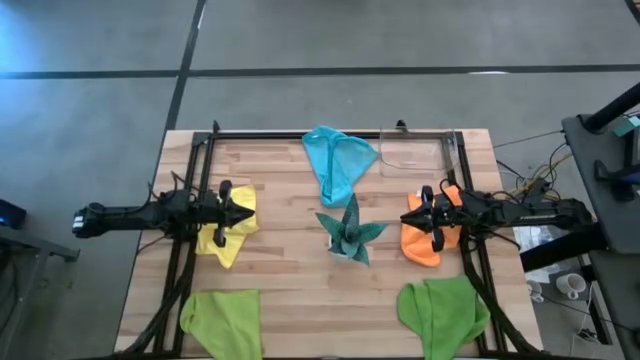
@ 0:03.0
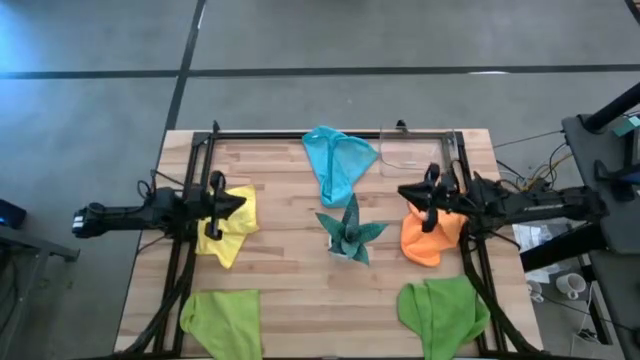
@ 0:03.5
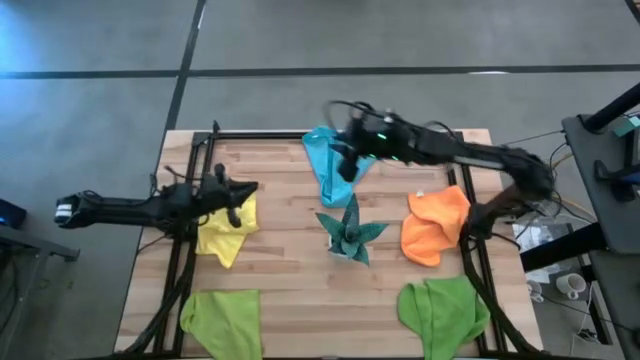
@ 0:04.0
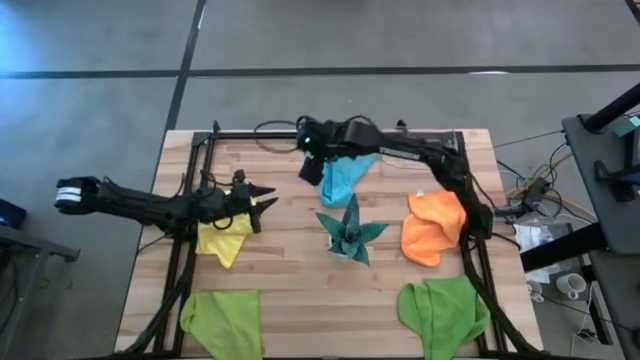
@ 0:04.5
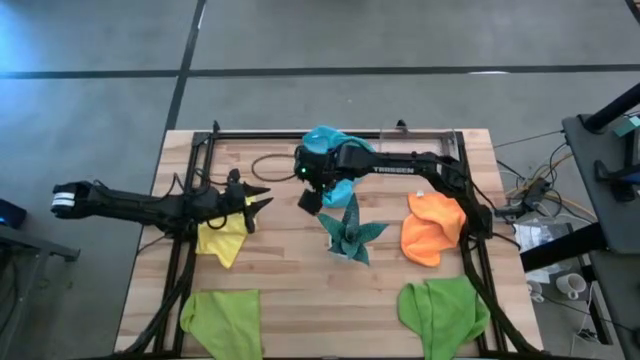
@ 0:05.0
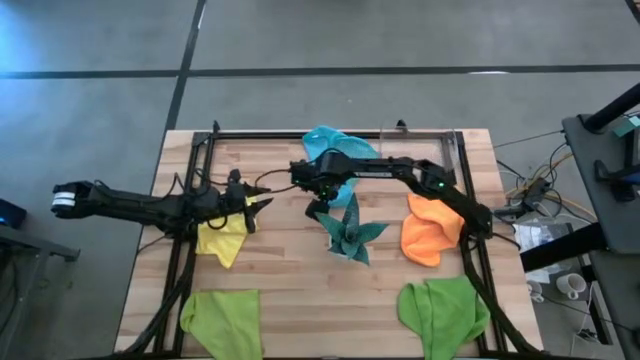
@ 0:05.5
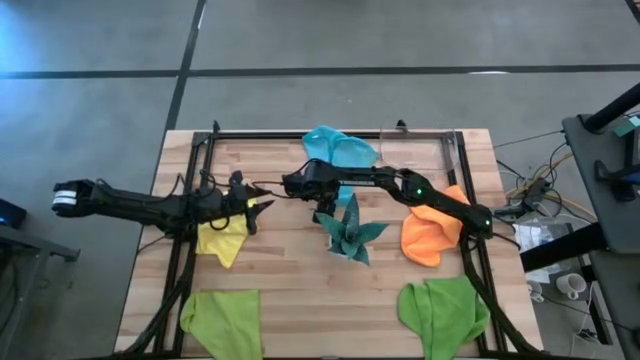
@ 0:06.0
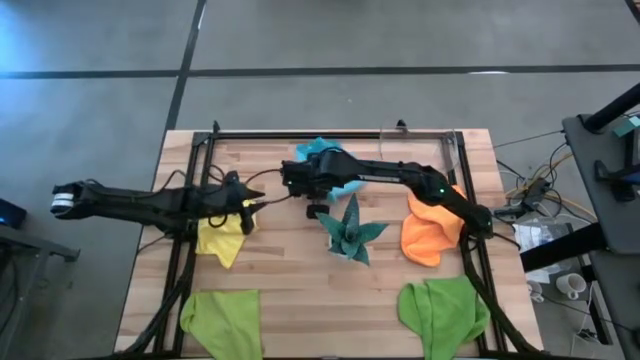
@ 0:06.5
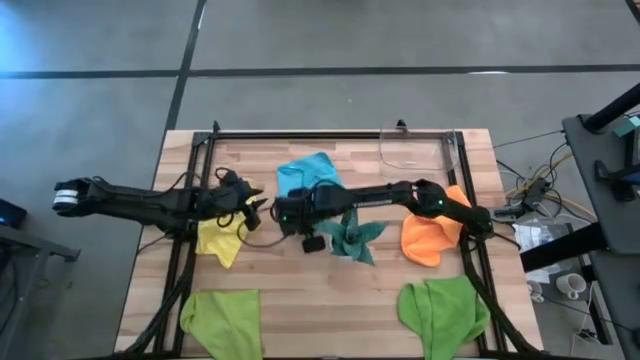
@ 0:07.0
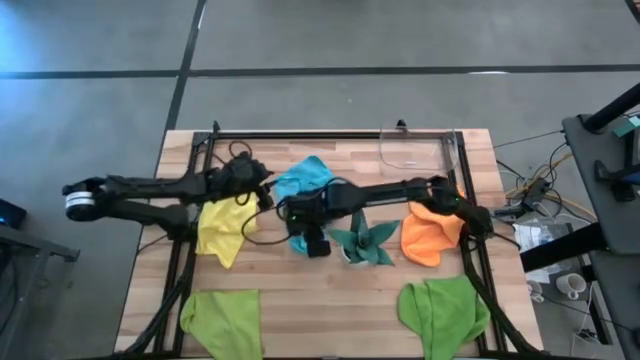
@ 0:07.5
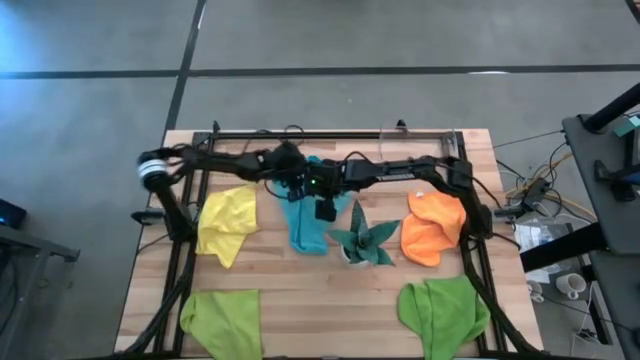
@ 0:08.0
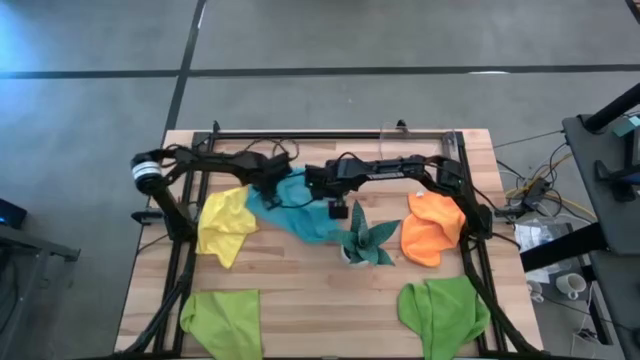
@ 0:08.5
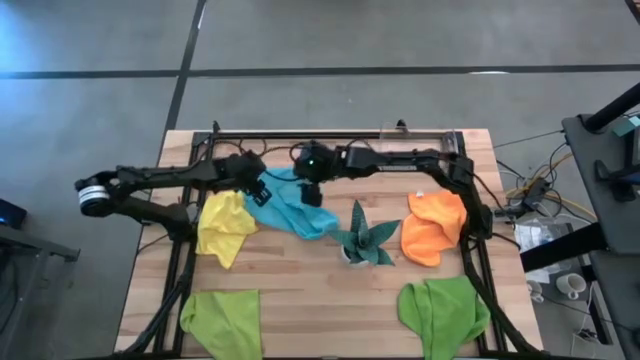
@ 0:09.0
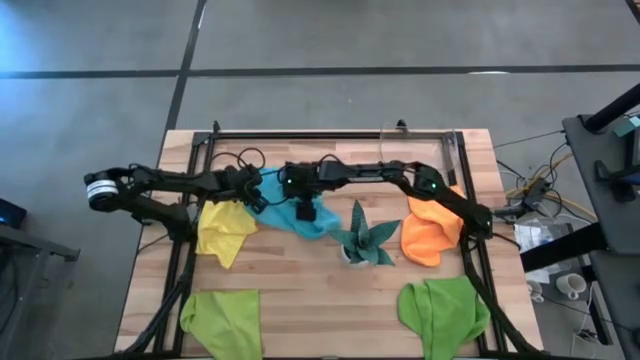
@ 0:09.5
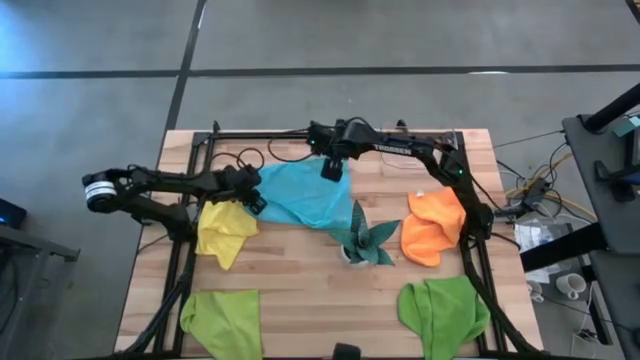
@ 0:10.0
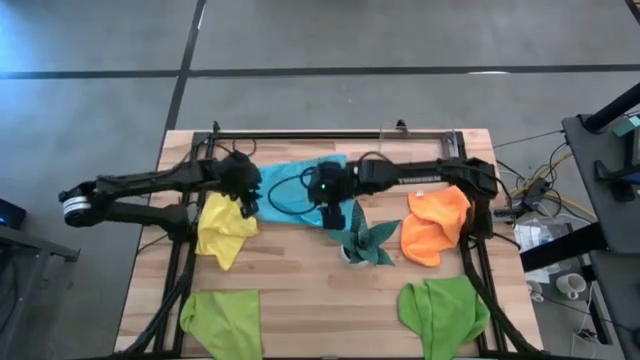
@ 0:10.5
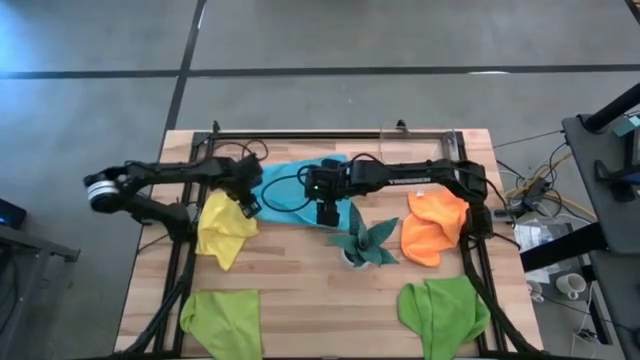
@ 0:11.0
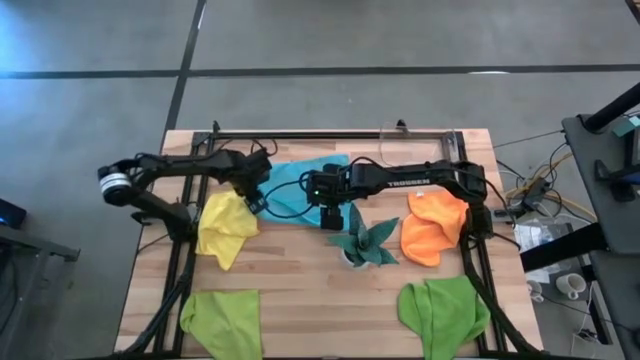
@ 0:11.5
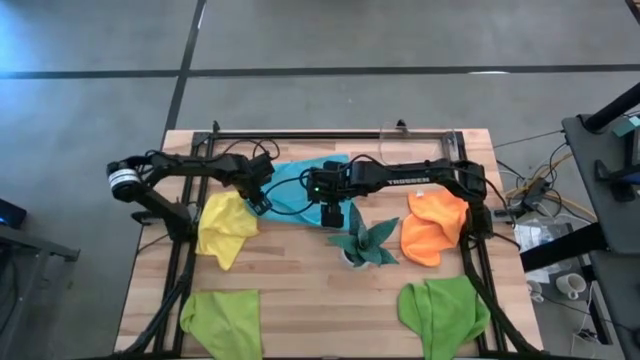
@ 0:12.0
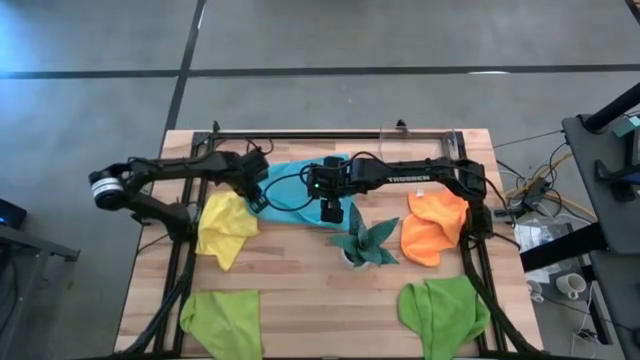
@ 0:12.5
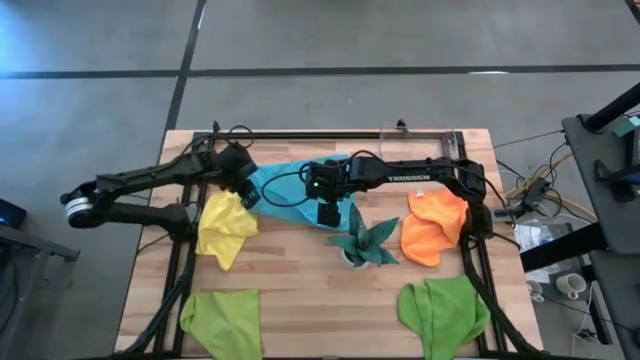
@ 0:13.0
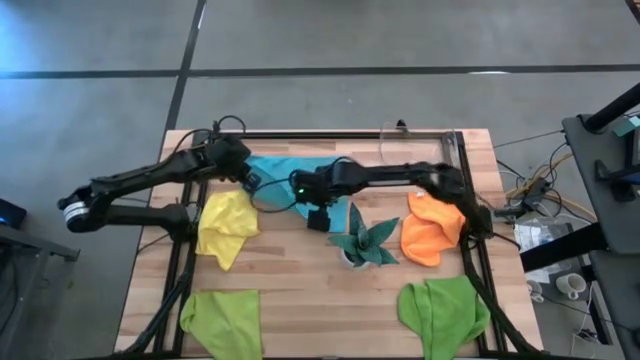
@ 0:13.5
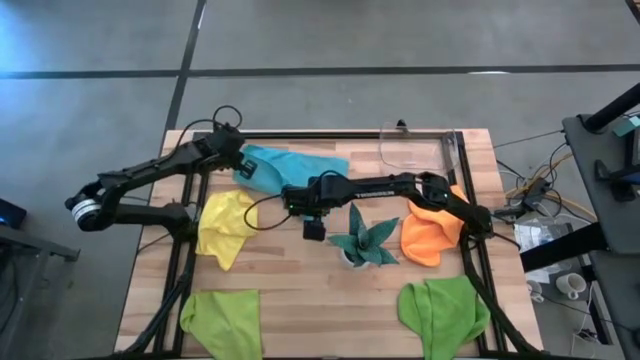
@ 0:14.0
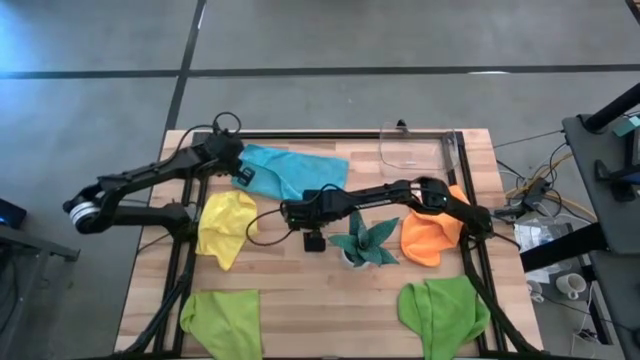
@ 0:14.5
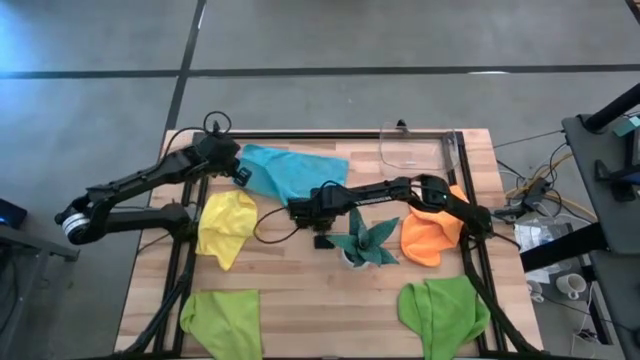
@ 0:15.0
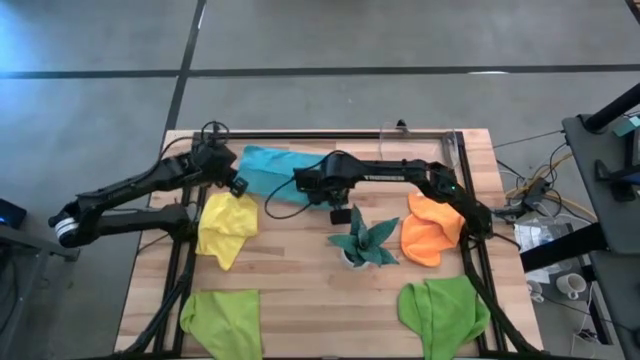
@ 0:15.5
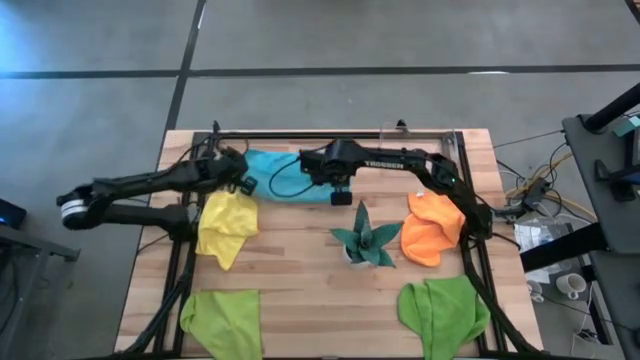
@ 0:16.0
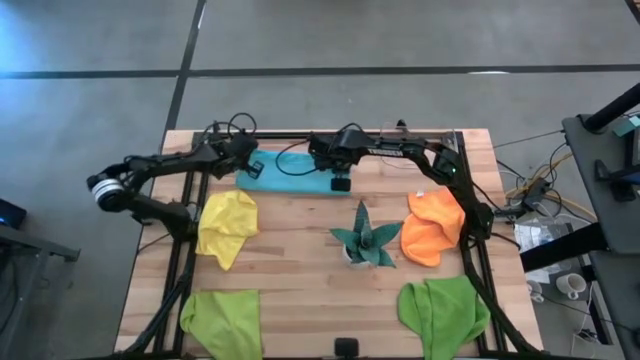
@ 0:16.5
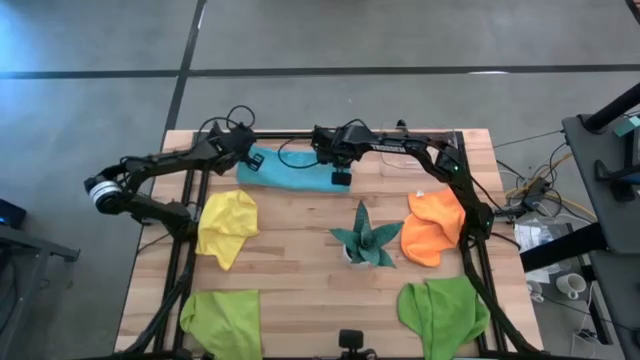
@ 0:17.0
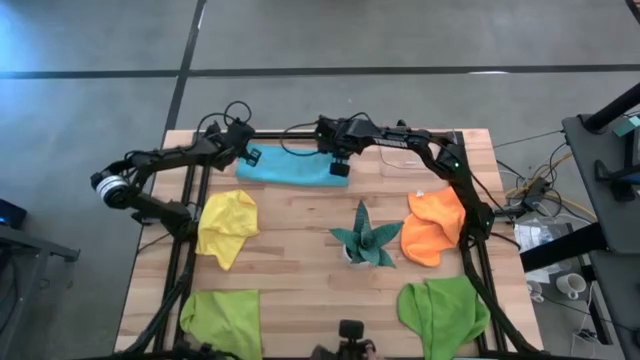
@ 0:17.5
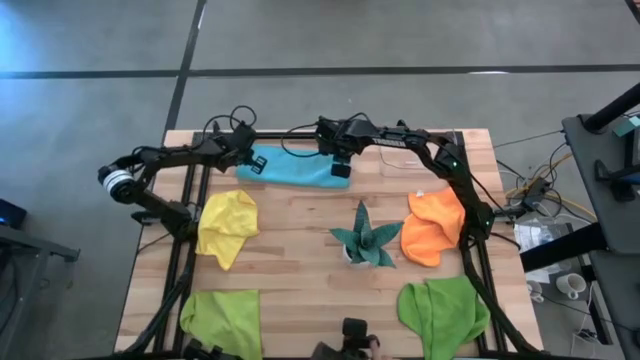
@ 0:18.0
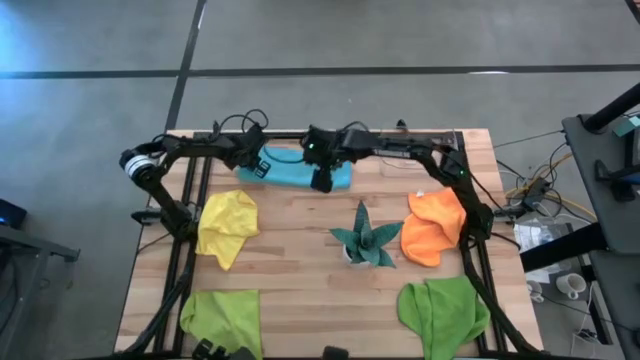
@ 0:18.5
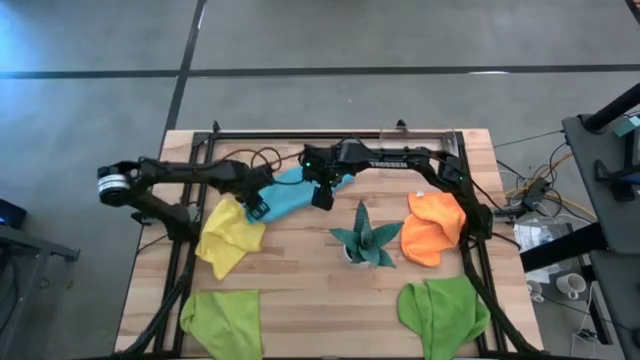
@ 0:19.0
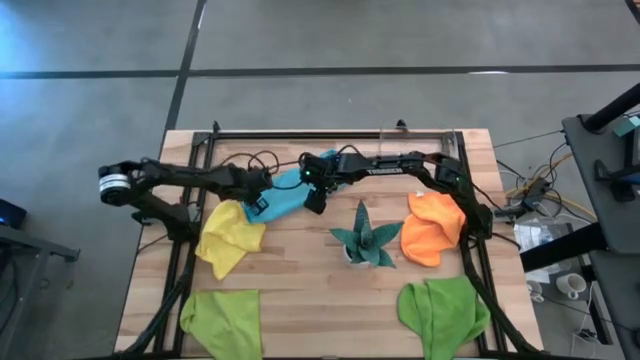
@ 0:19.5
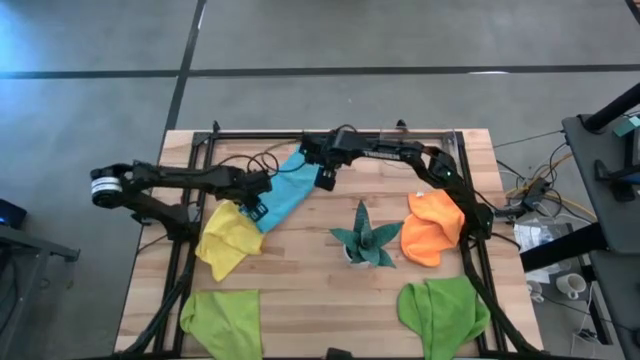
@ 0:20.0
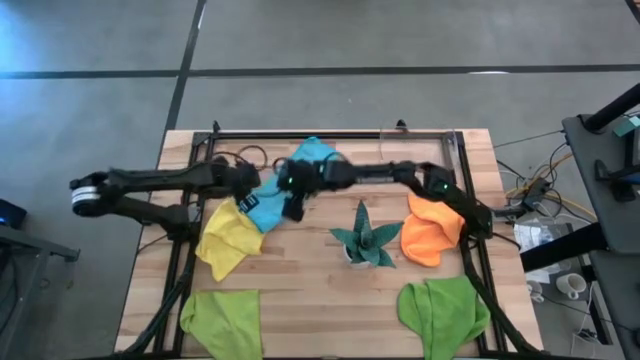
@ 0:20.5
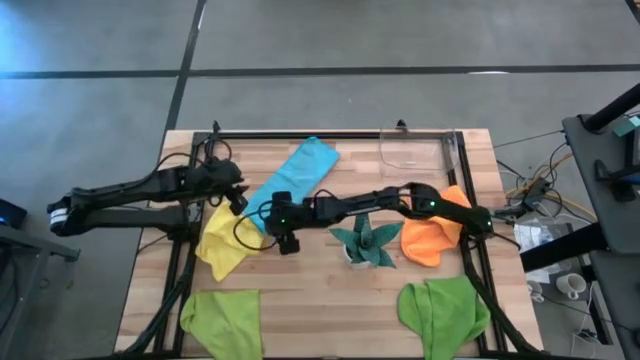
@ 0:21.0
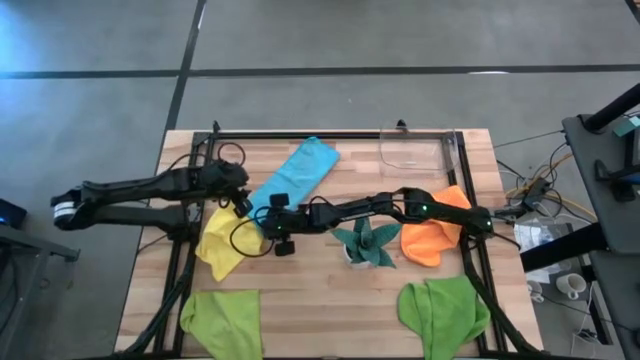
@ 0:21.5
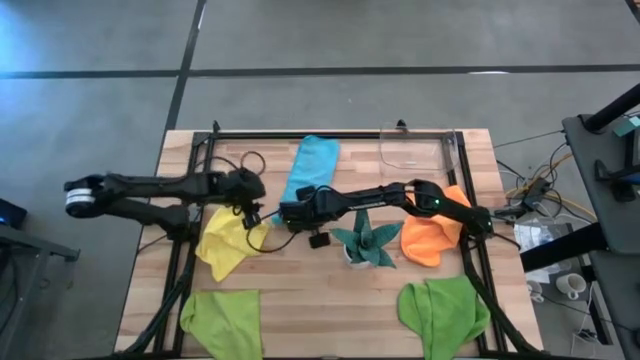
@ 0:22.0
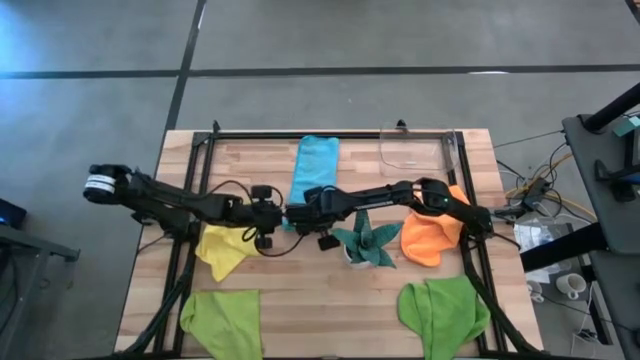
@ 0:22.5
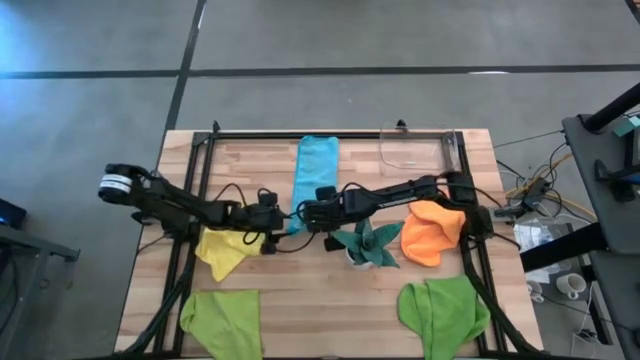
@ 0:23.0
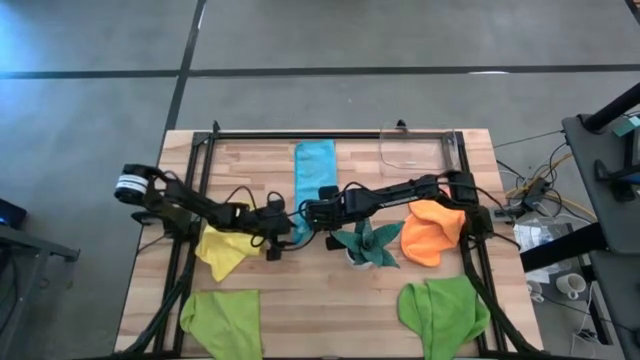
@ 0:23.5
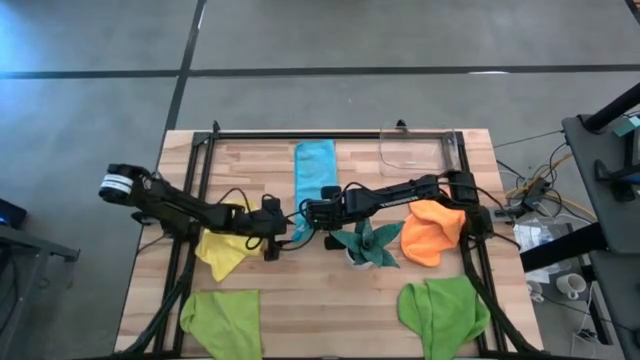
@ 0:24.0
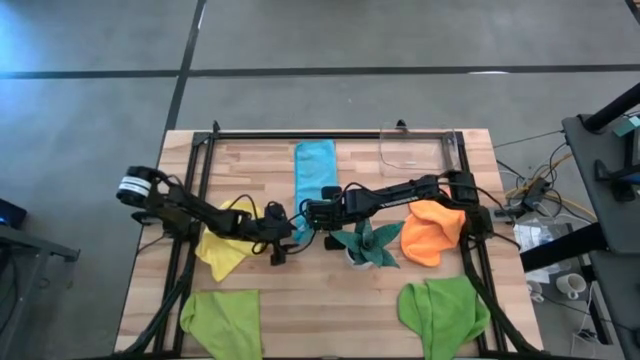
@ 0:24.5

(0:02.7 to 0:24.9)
Task: Fold microfiber towels
Fold the blue microfiber cloth
